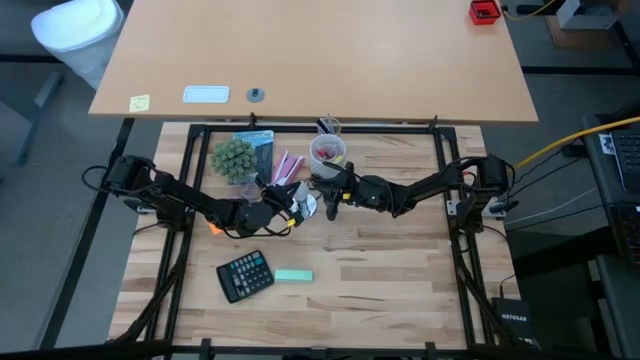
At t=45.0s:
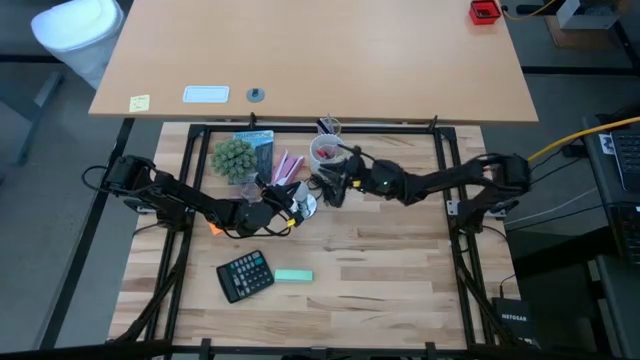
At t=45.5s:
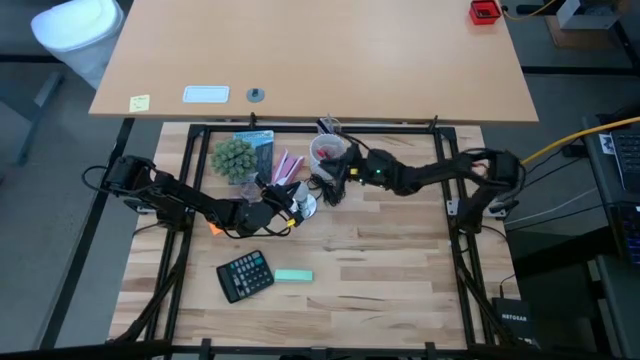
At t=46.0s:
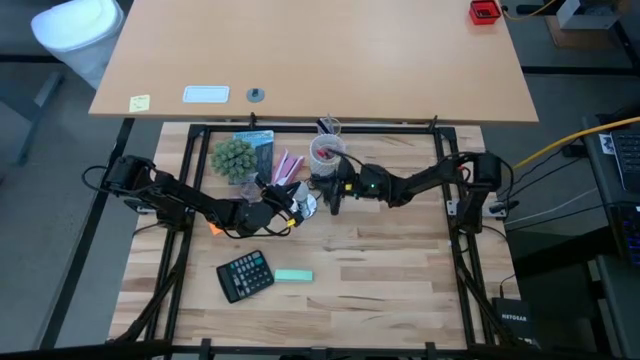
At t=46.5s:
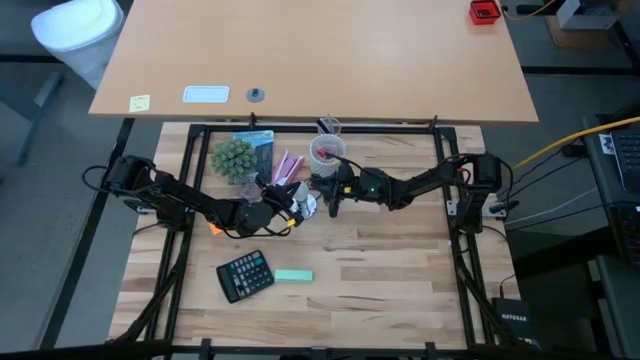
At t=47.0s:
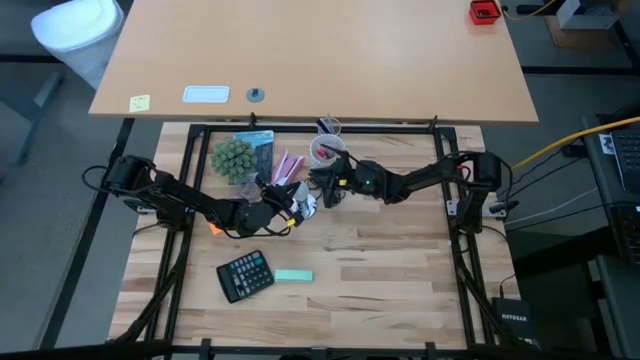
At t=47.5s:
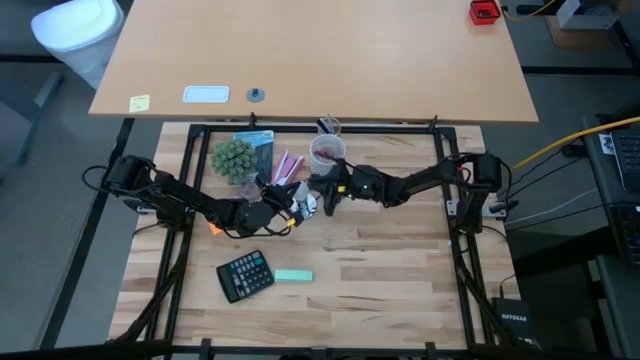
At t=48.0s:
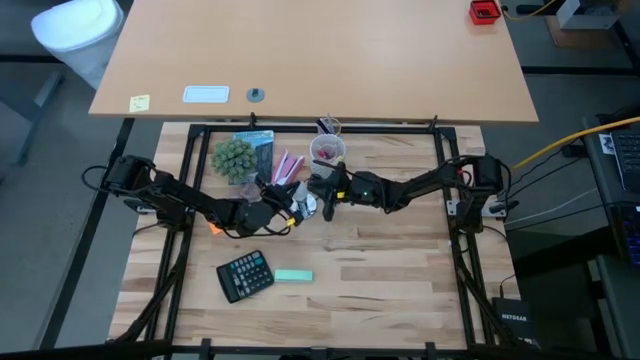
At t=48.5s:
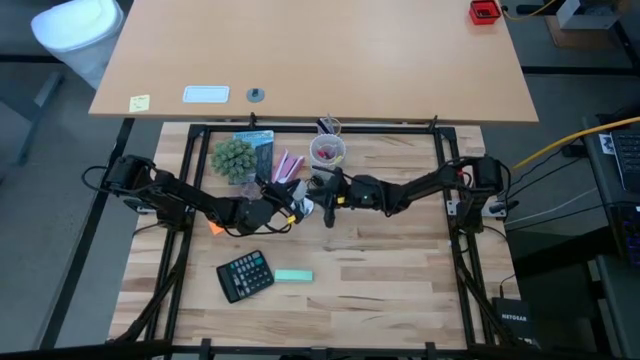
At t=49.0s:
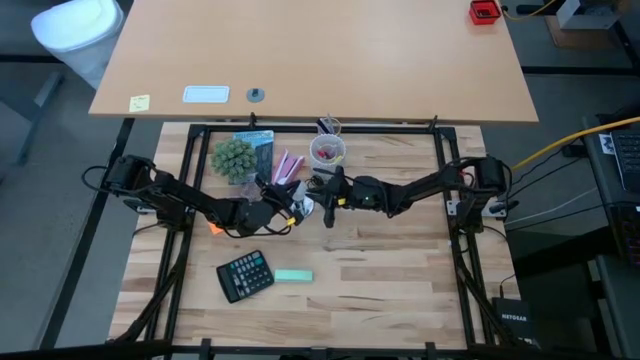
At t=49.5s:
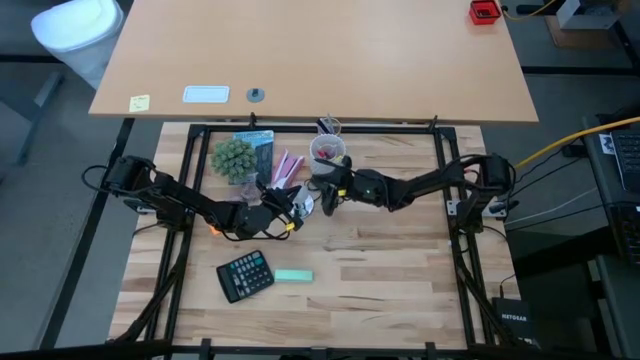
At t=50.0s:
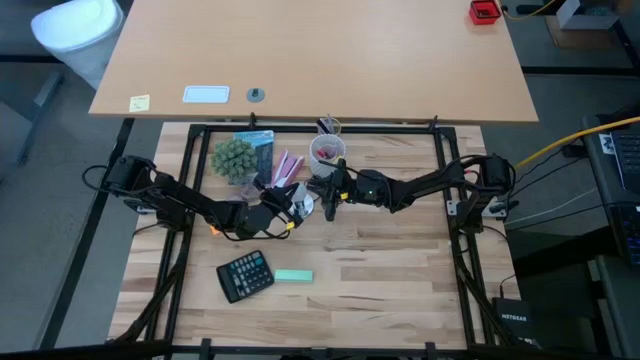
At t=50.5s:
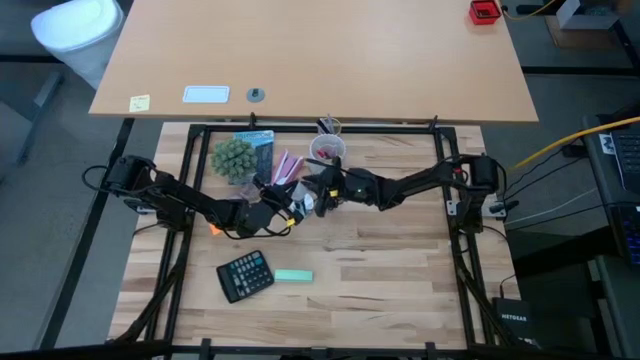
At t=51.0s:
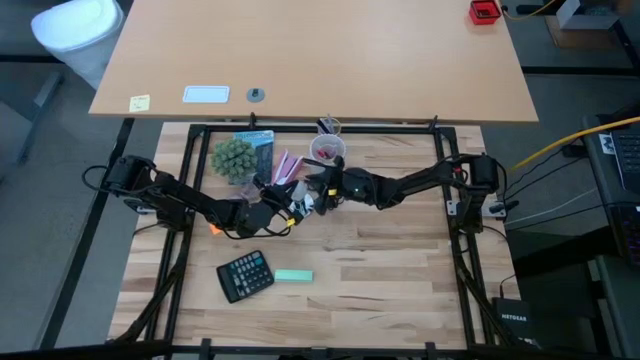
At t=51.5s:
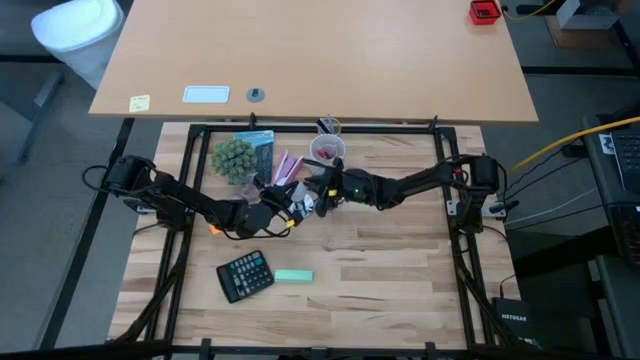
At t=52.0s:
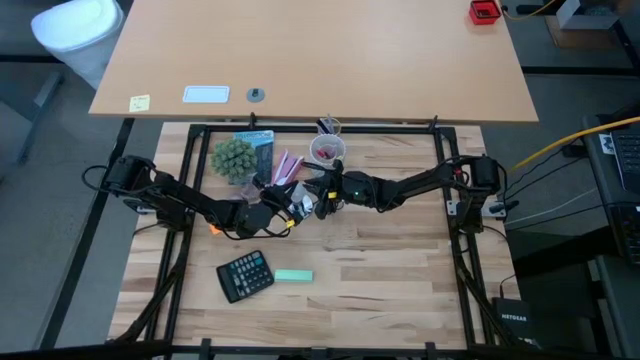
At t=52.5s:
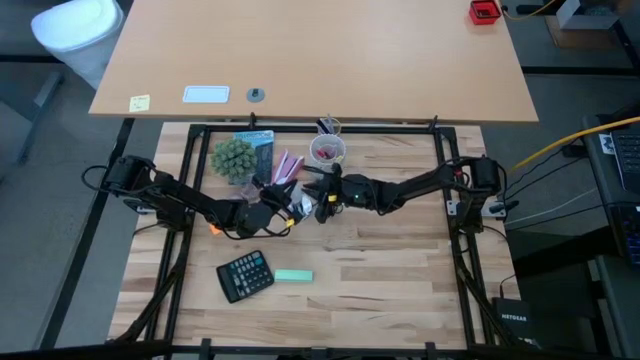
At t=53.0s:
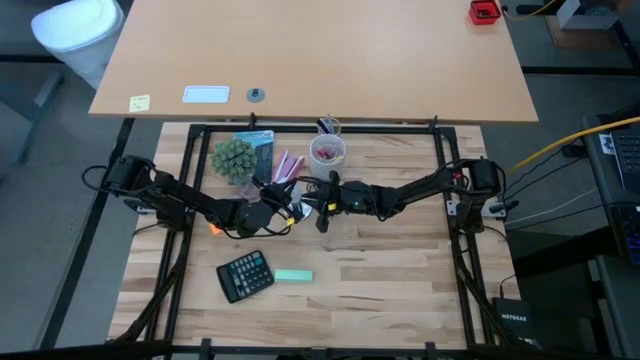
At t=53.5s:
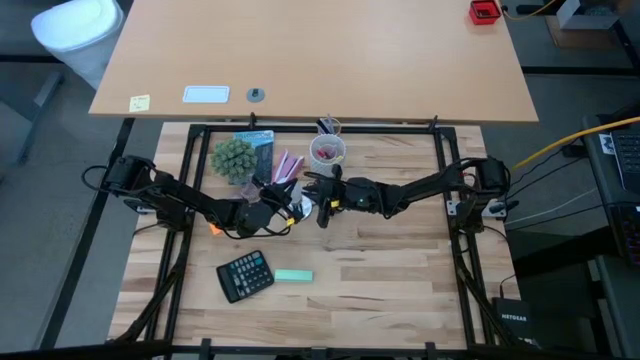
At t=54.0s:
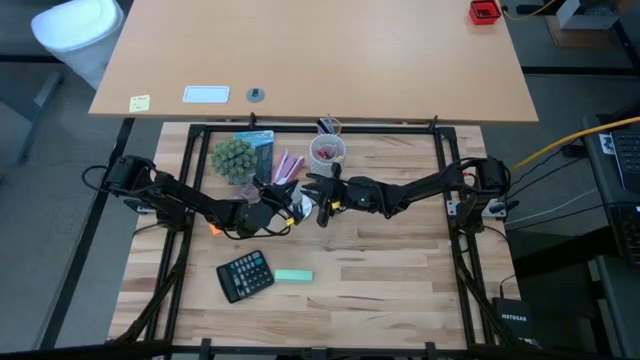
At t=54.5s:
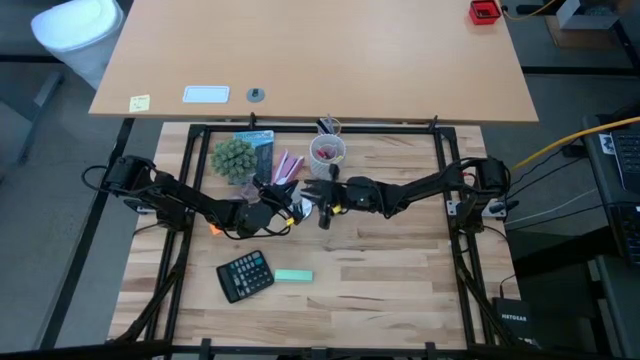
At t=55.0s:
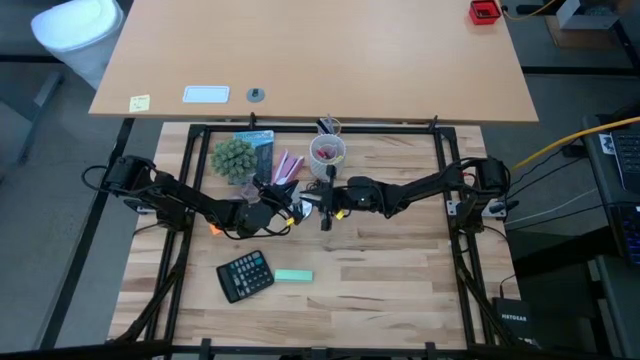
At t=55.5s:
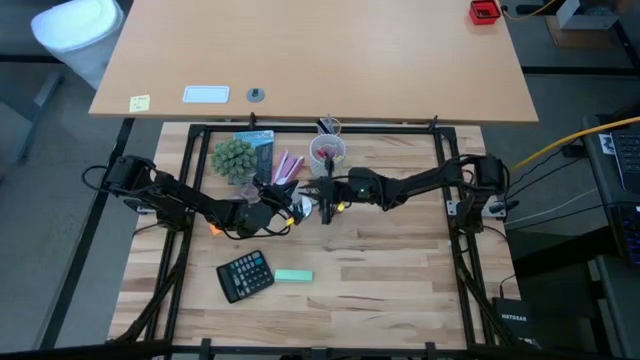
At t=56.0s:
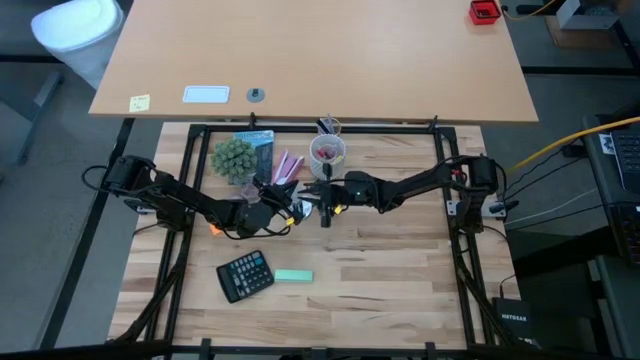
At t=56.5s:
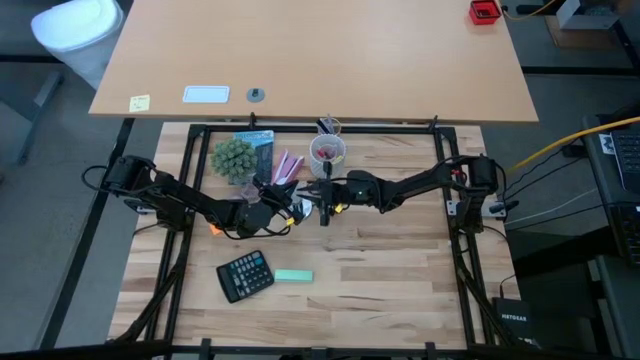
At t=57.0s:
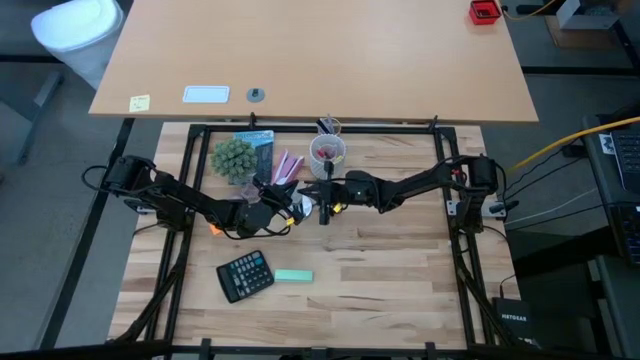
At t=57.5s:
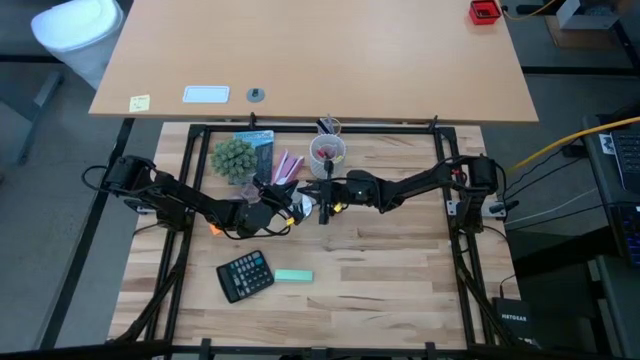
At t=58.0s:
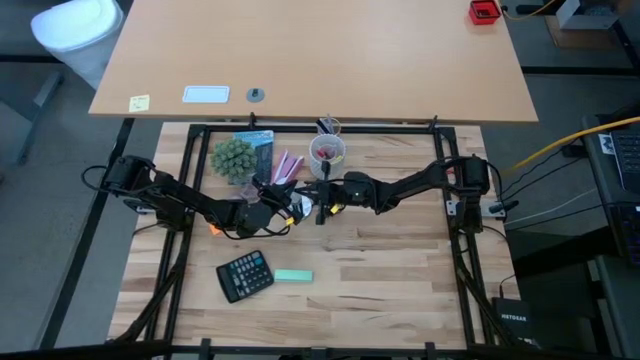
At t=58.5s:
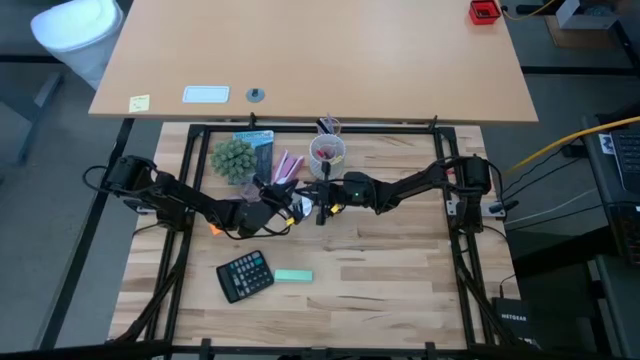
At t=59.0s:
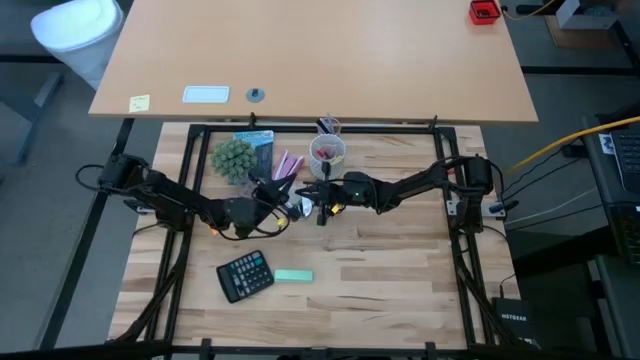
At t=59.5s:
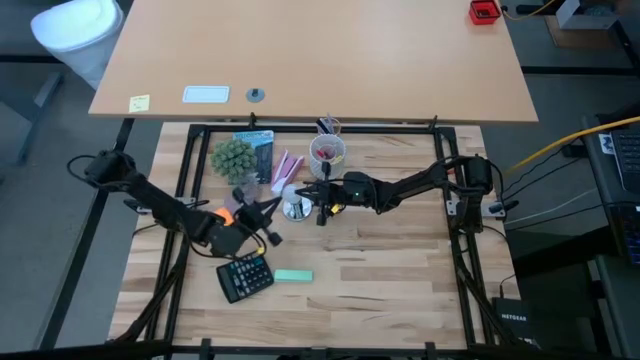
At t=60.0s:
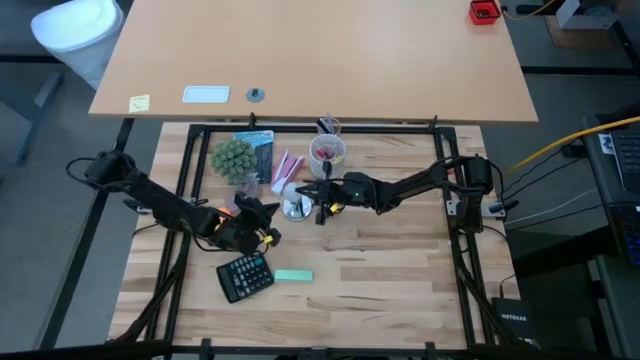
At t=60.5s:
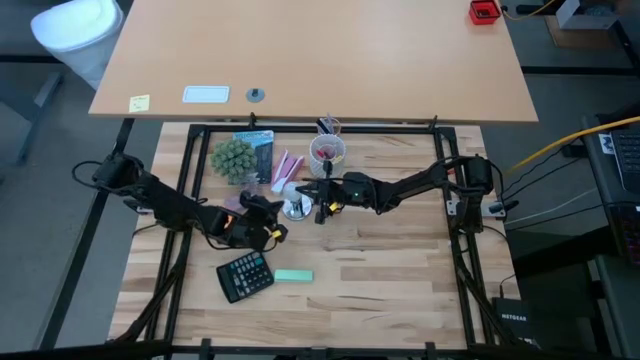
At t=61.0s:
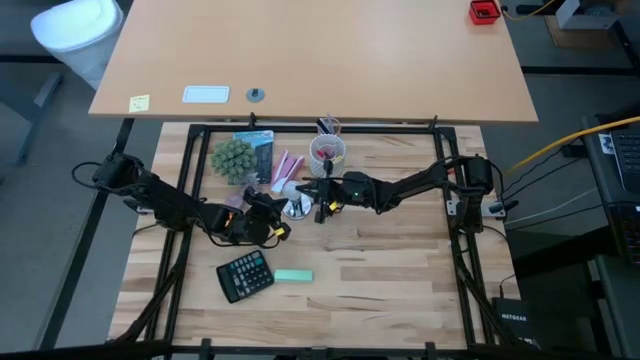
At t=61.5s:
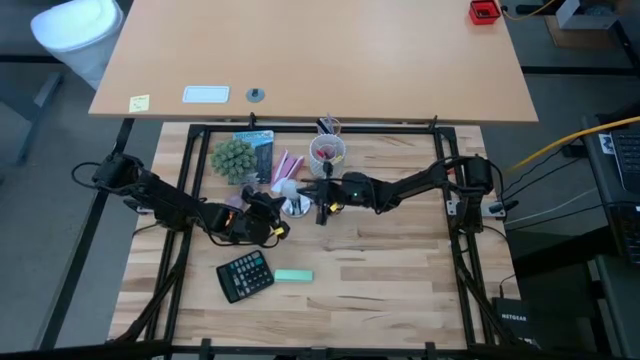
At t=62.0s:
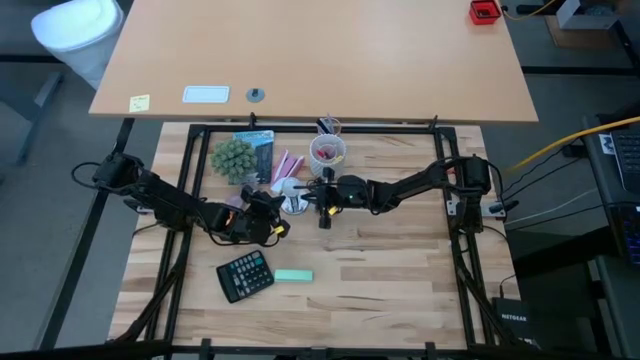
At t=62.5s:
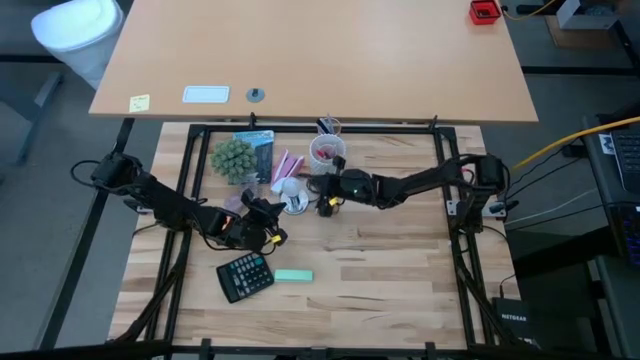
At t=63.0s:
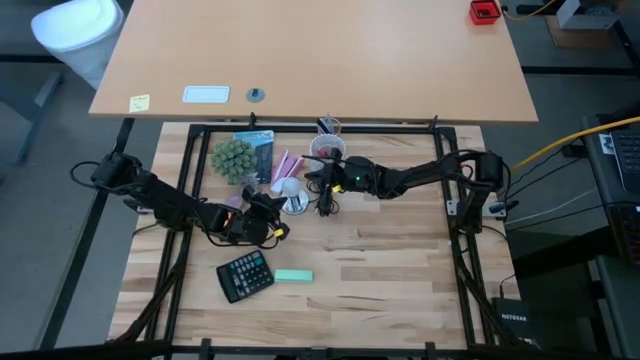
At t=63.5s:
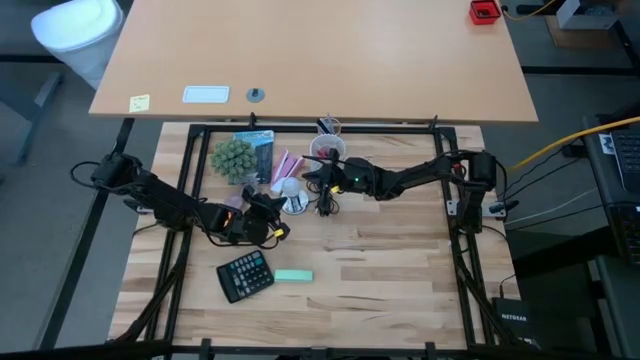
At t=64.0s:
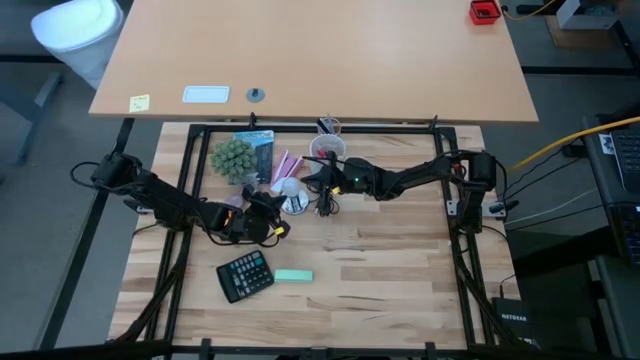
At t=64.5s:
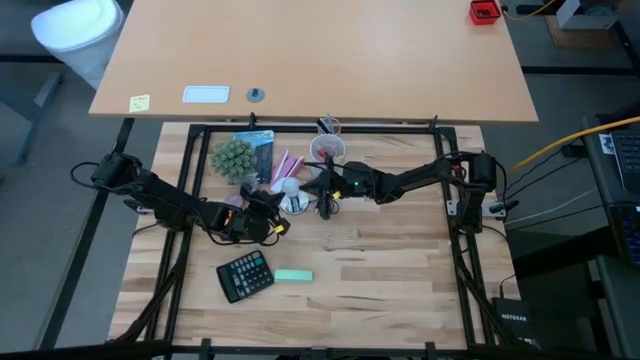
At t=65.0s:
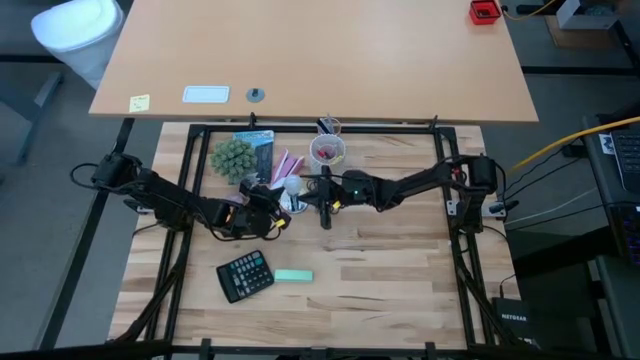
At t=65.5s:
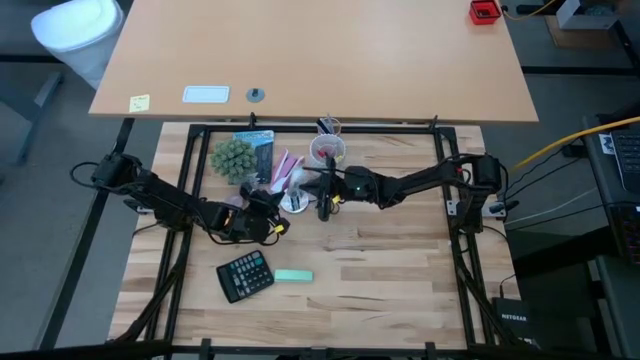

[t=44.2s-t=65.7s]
Task: Screw lightbulb
Insert the lightbulb into the lamp
